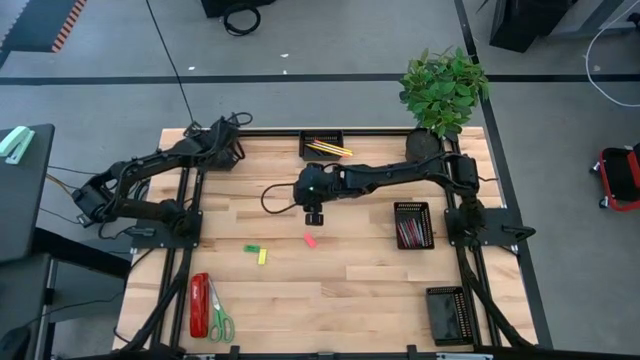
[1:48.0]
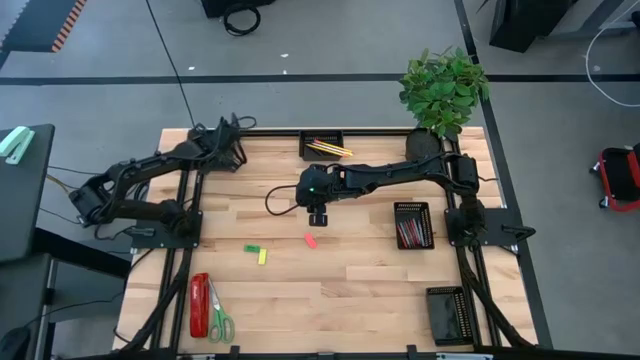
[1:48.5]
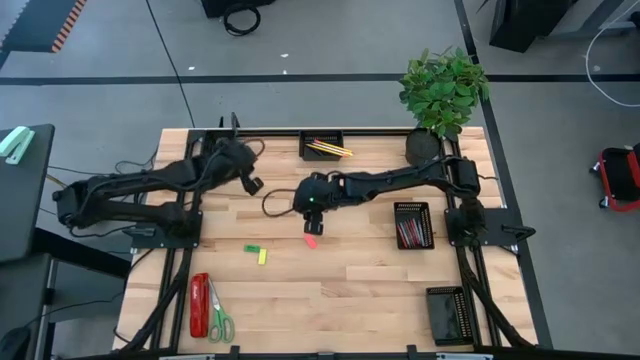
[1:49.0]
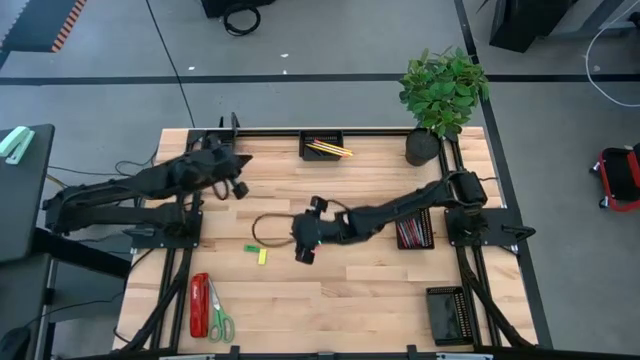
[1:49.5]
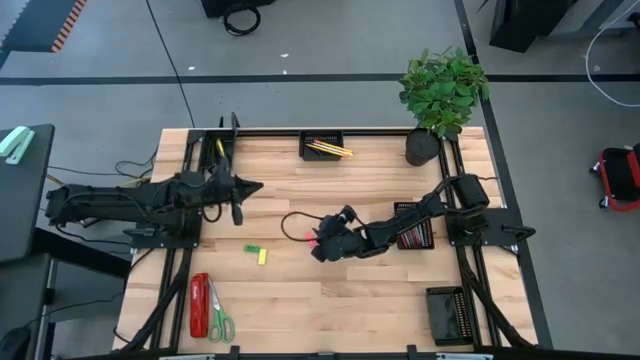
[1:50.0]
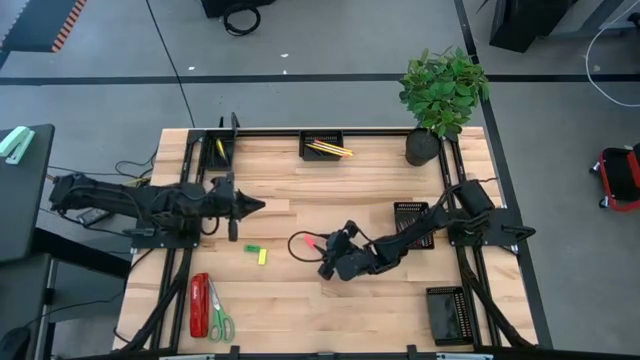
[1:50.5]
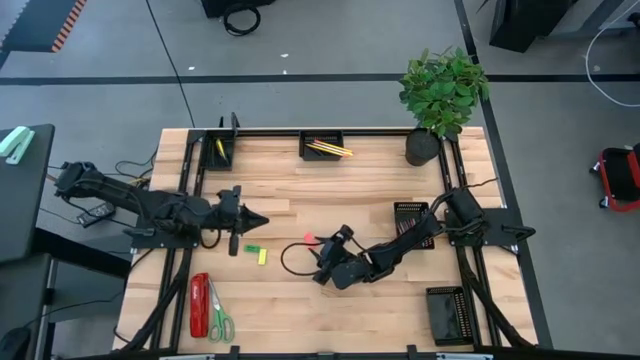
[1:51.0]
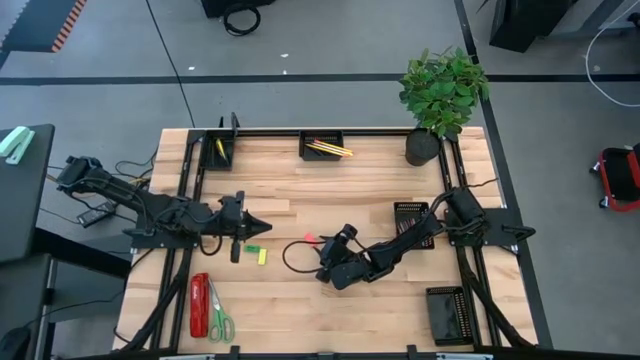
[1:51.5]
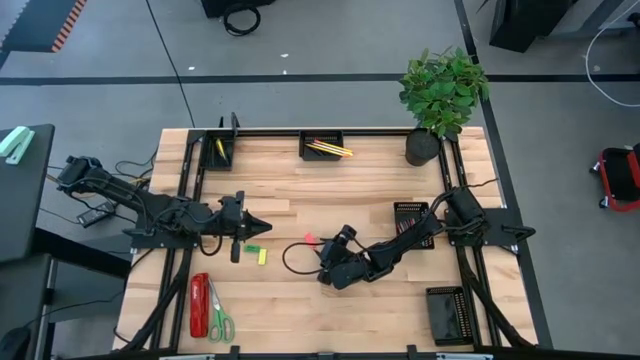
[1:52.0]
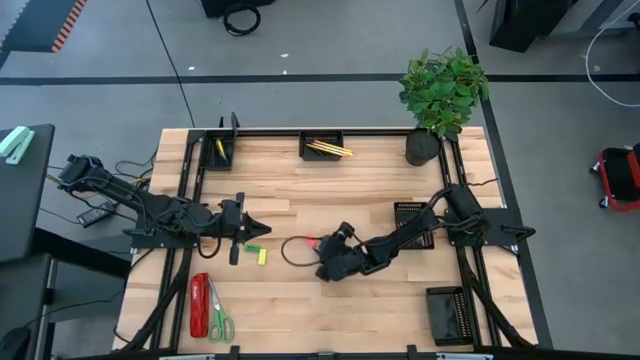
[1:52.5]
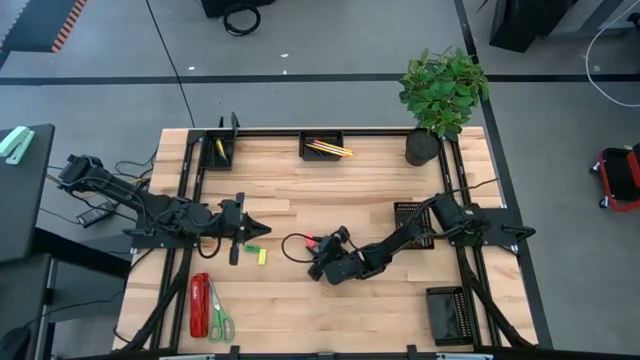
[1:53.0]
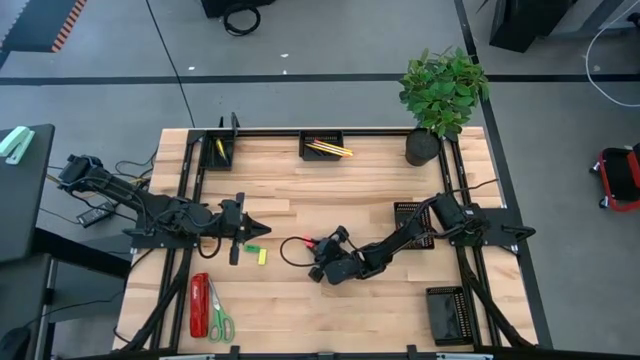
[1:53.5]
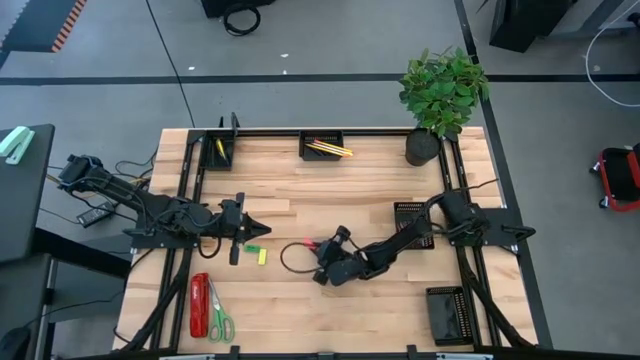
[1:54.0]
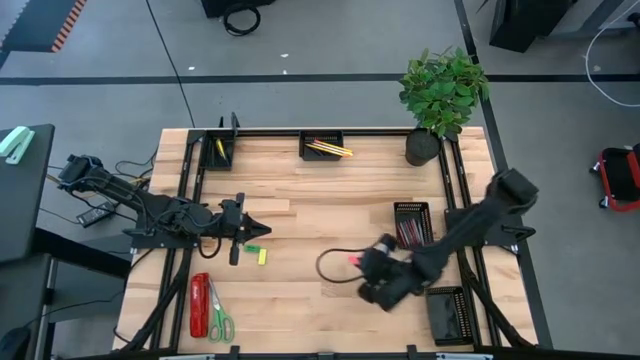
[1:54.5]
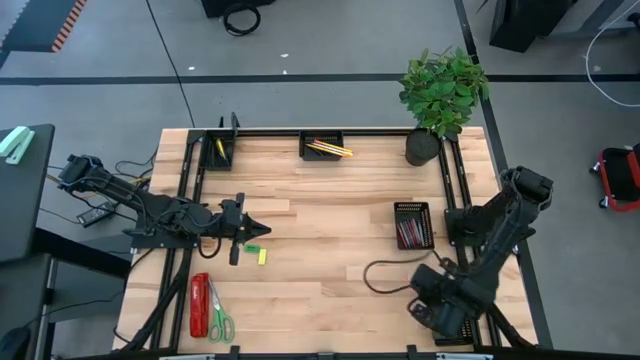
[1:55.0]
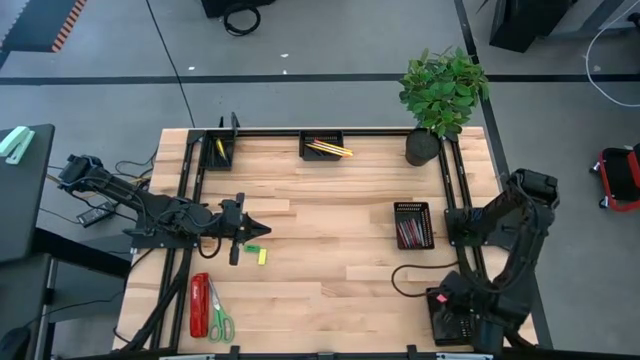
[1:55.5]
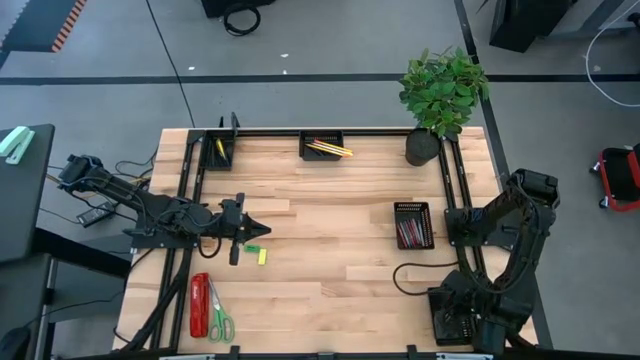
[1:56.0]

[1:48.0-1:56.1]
Task: Sort crayons/erasers/pens/pencils in bins
Put the pink eraser into the bottom right black bin

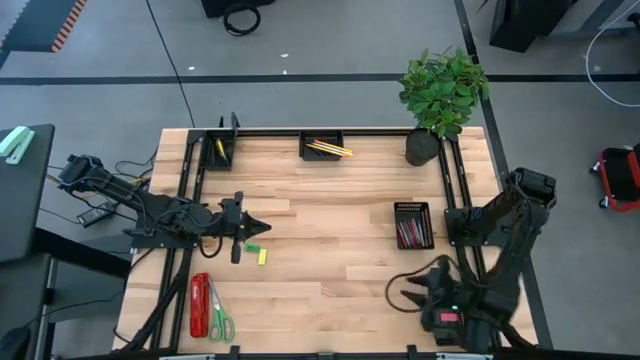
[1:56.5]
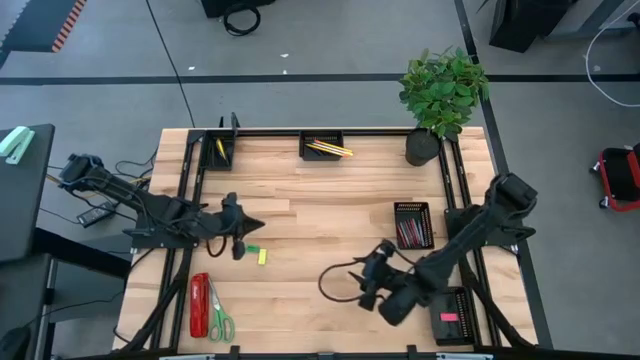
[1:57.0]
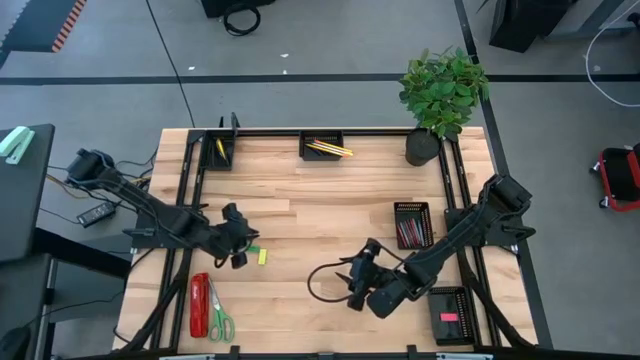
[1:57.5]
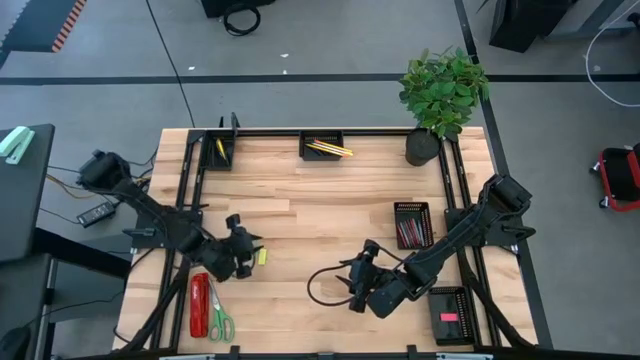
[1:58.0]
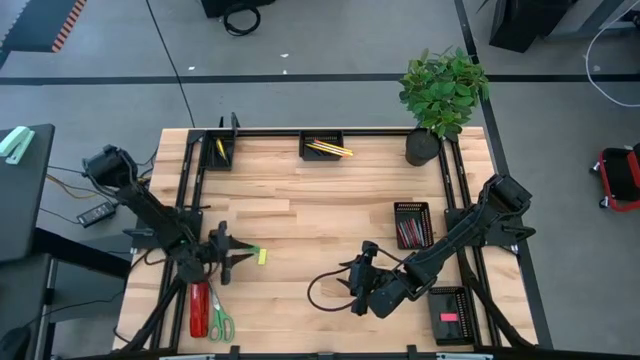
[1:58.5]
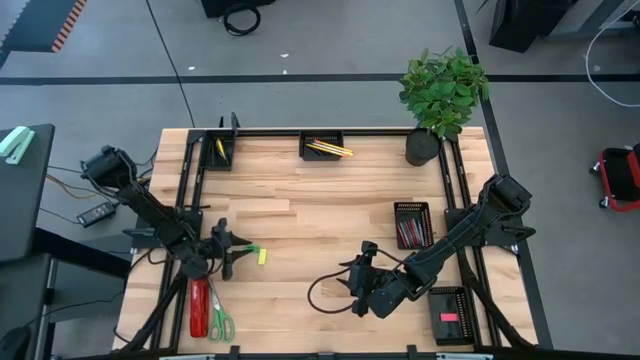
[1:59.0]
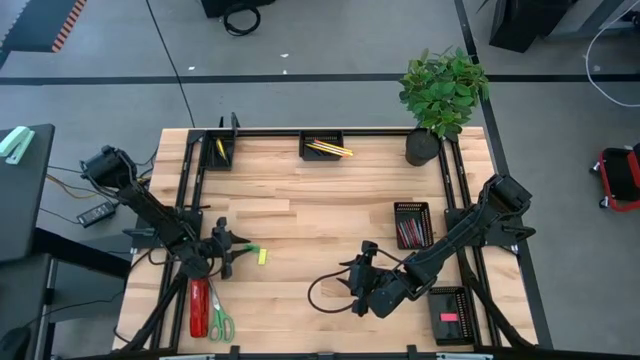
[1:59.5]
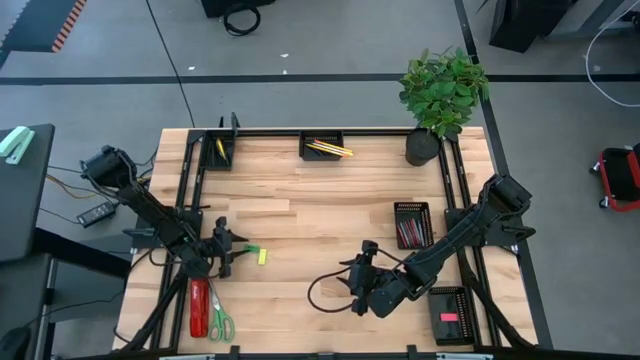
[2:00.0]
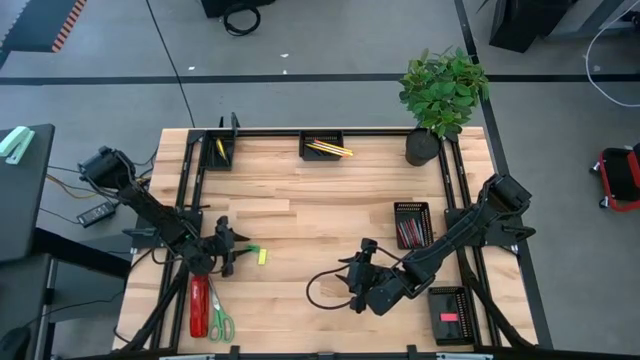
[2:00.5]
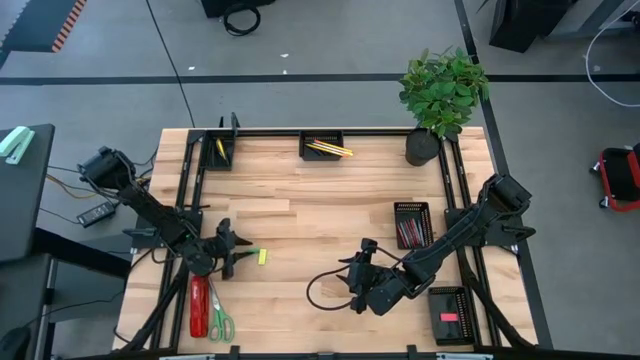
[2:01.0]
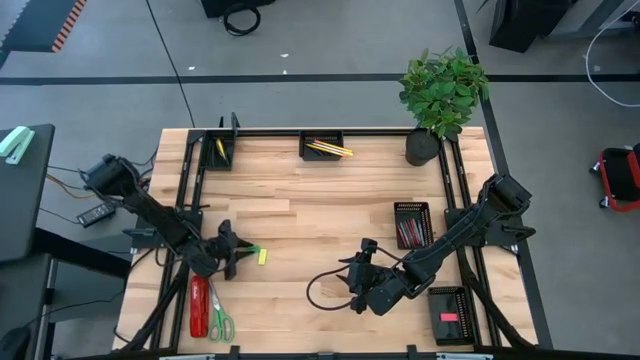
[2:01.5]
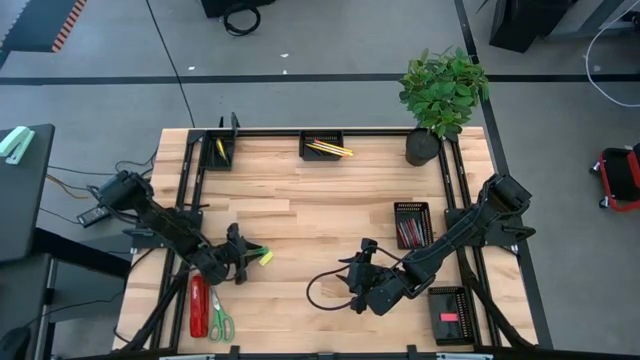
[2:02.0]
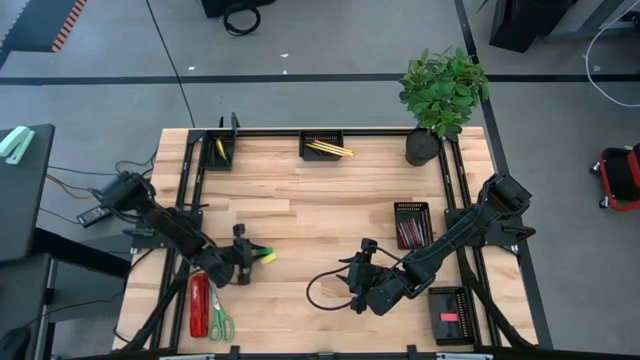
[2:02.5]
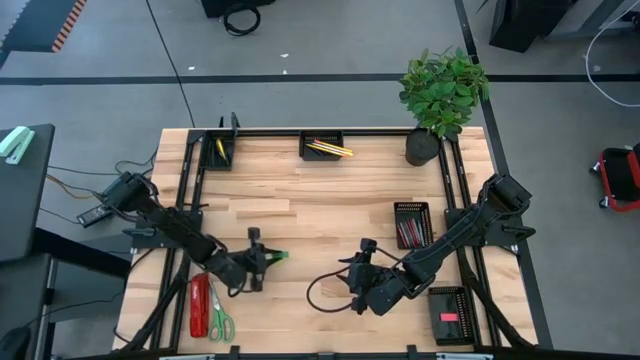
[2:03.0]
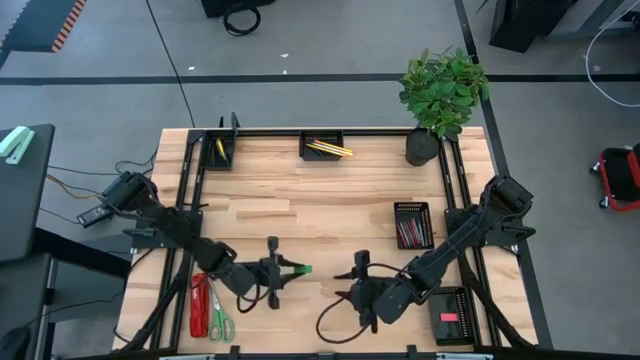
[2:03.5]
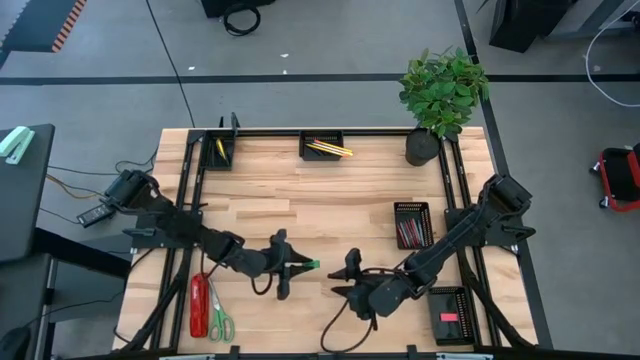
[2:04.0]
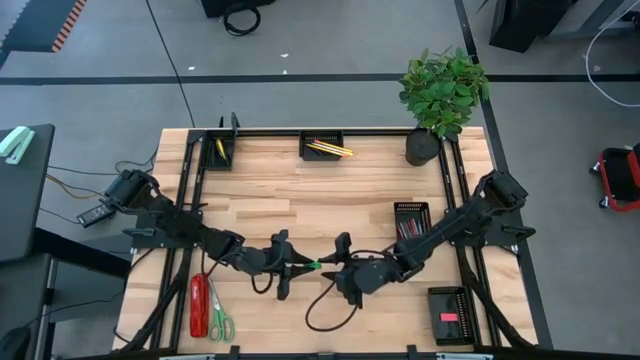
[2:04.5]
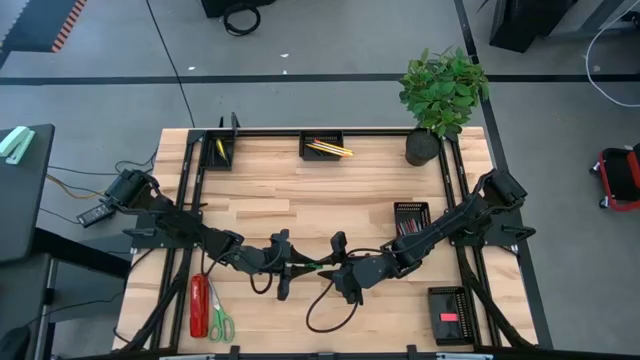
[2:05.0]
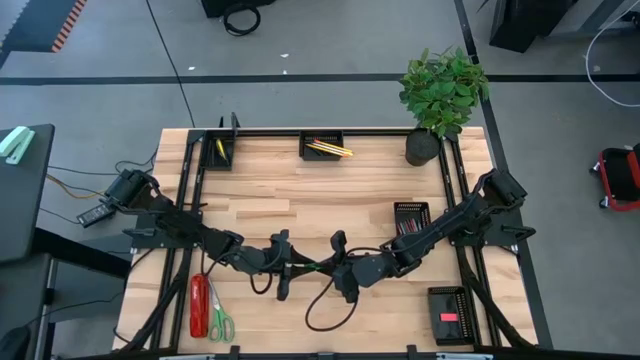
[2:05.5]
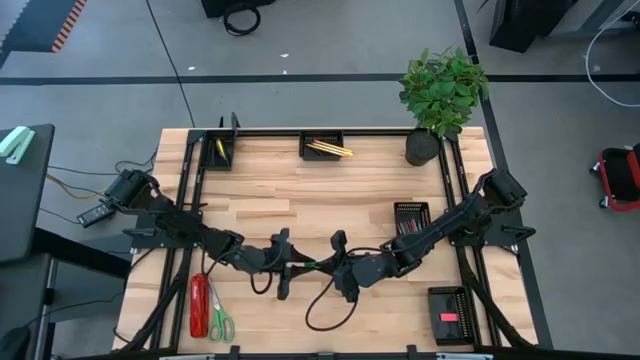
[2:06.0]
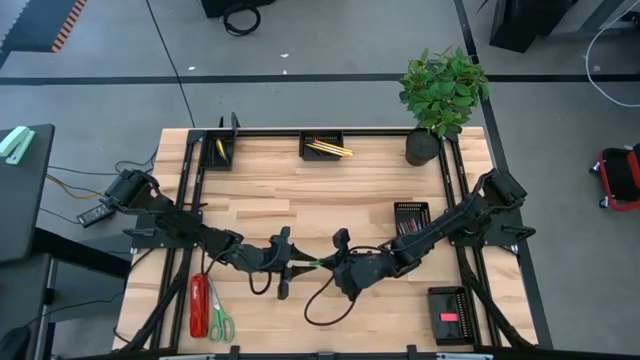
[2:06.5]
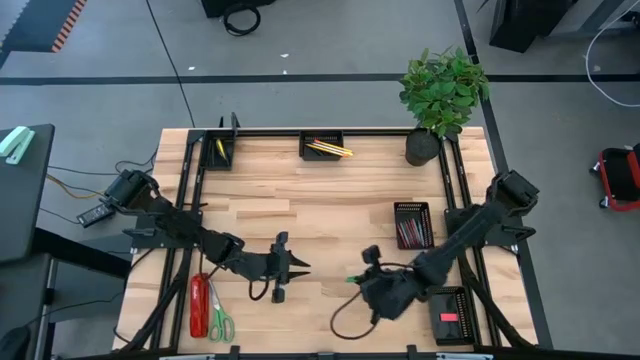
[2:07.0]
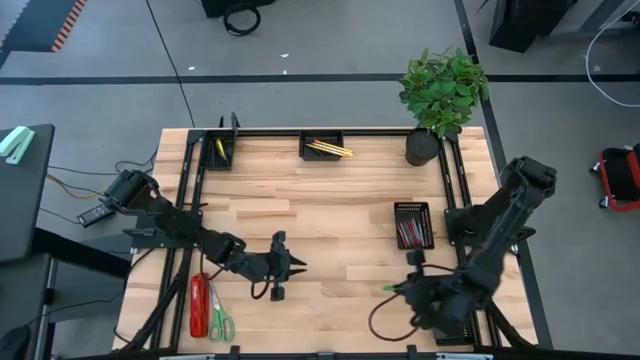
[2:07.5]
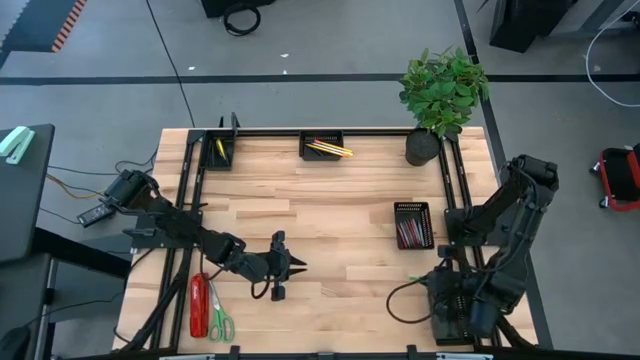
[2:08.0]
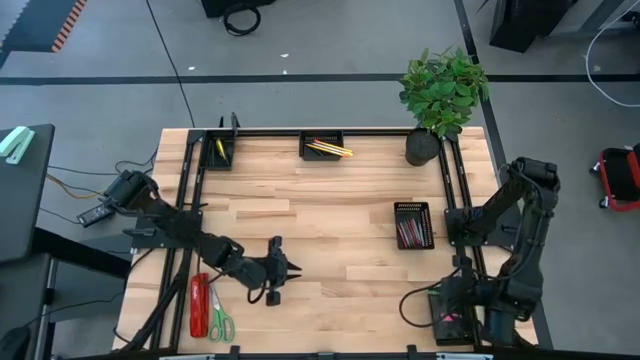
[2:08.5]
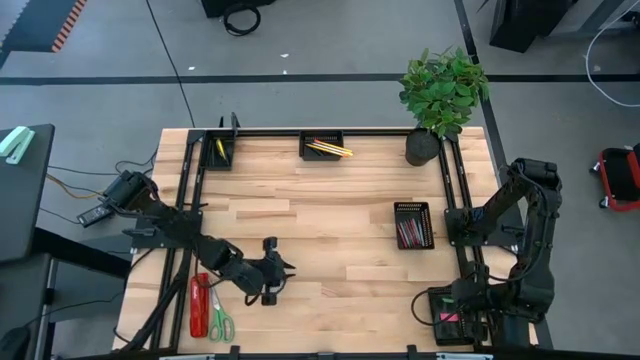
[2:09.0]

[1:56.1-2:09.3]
Put the green eraser into the bottom right black bin
